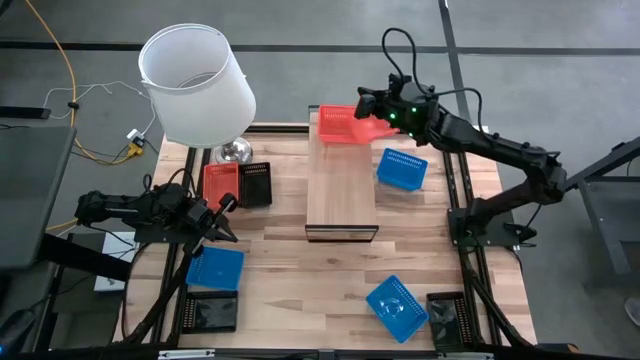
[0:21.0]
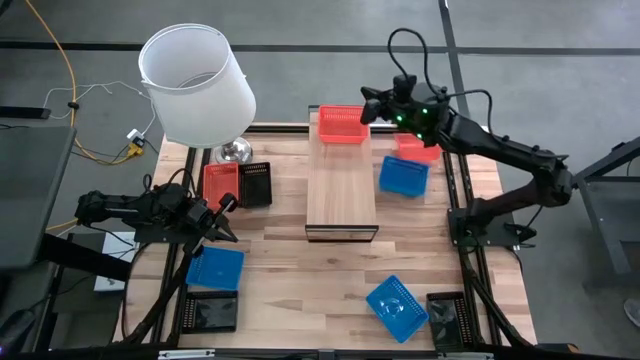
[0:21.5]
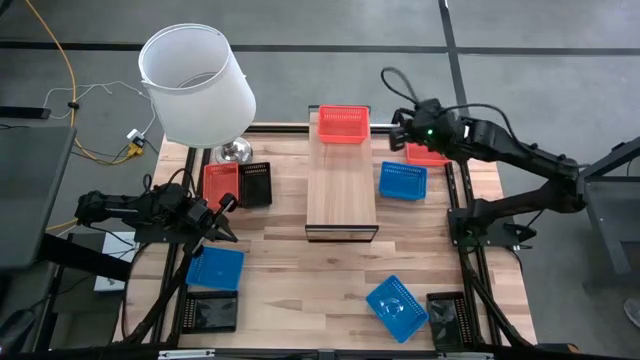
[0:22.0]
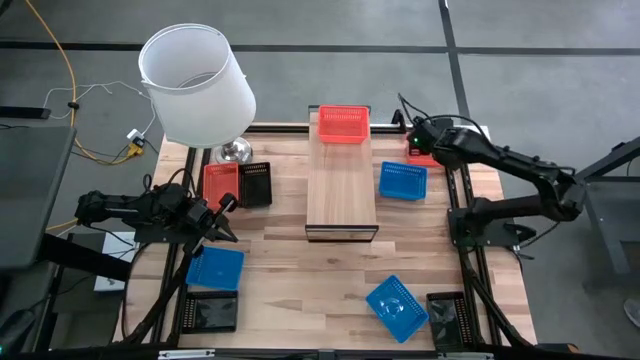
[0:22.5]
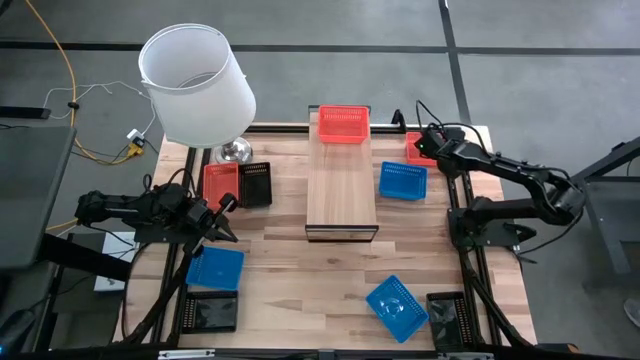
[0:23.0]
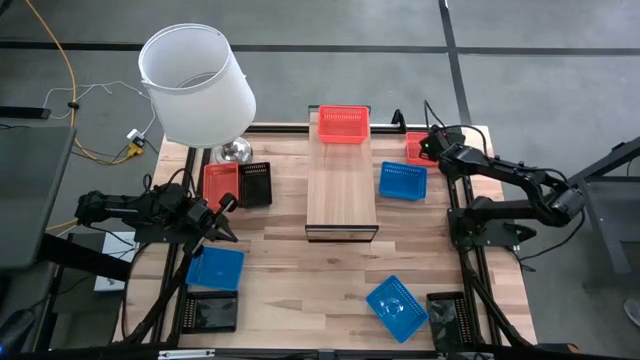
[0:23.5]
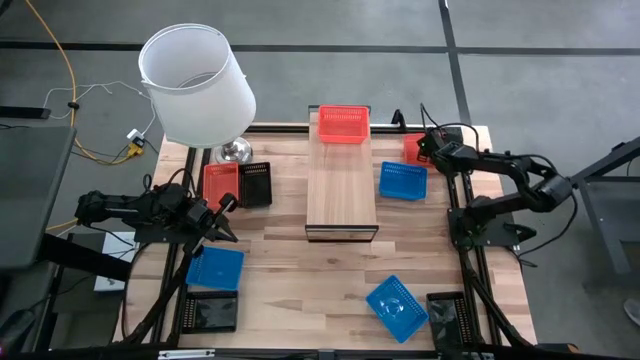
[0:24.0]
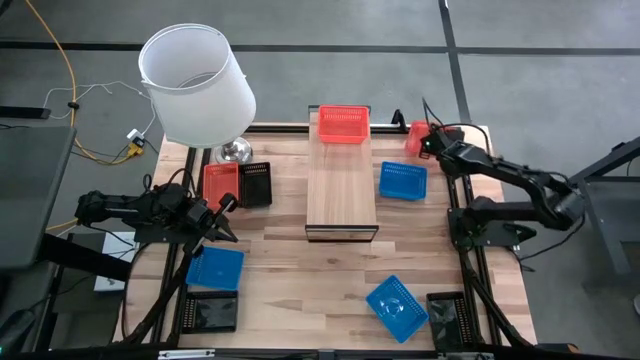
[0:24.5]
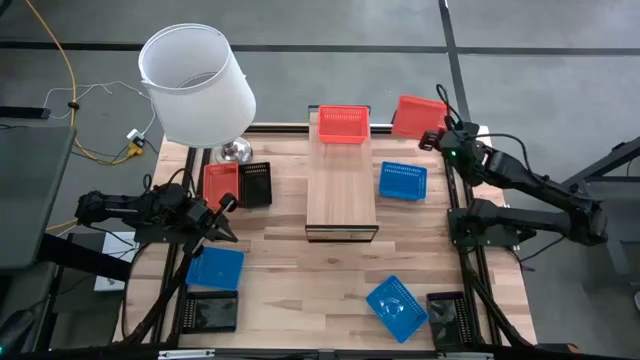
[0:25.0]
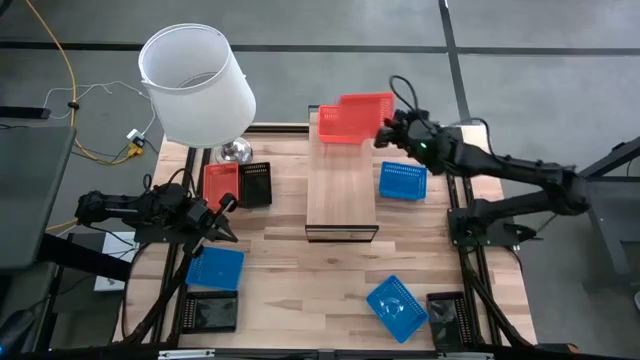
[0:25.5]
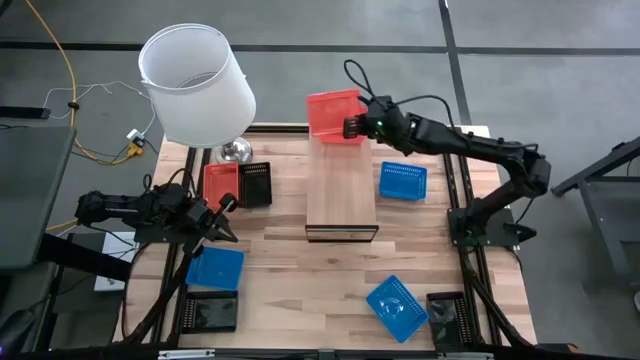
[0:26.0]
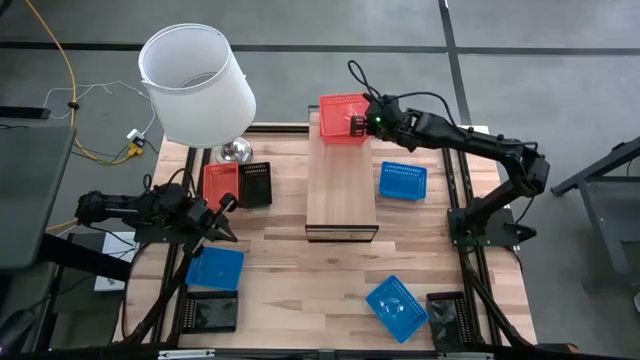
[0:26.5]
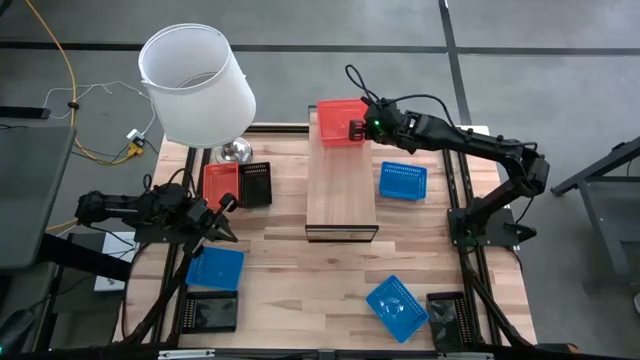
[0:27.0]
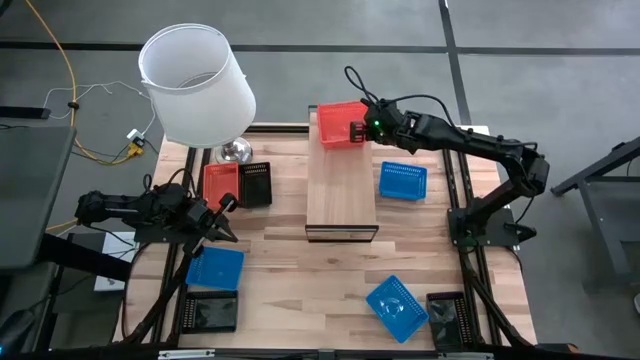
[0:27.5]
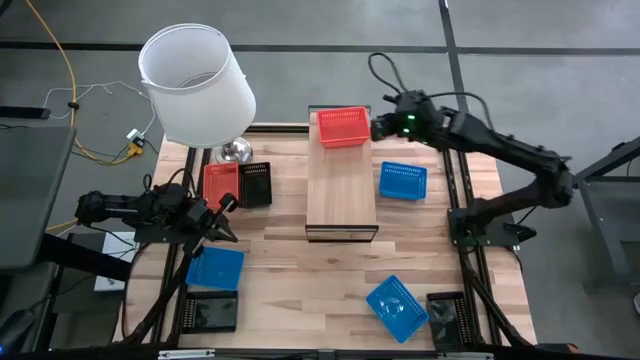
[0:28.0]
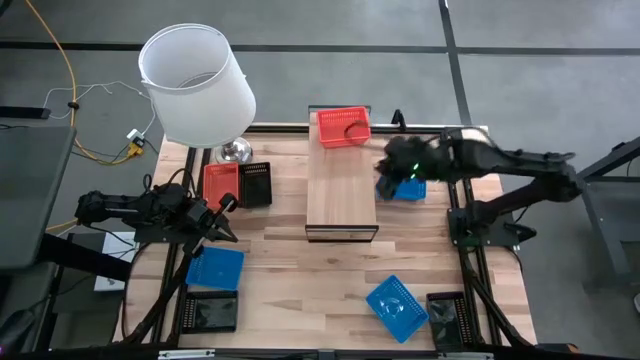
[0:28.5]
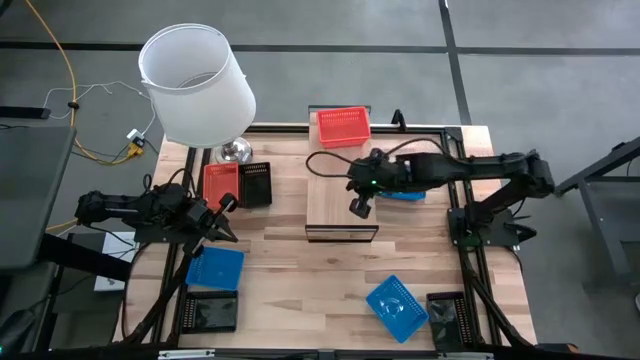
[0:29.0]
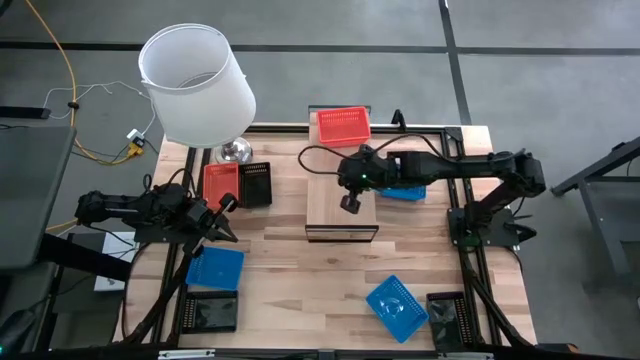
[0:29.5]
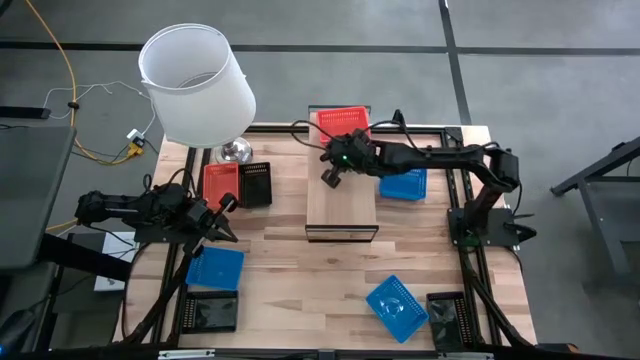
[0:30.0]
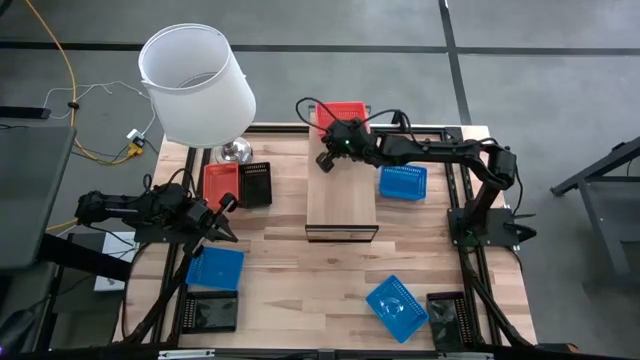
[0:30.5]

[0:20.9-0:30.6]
Task: Stack baskets on shelf by color
Stack the right orange bin on top of the orange bin on the shelf

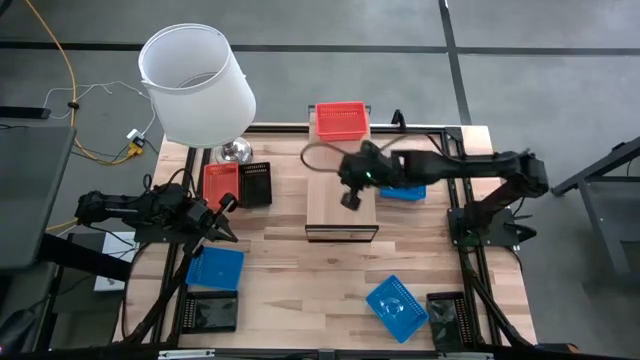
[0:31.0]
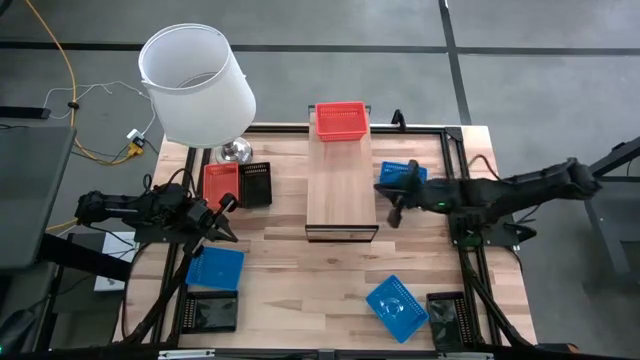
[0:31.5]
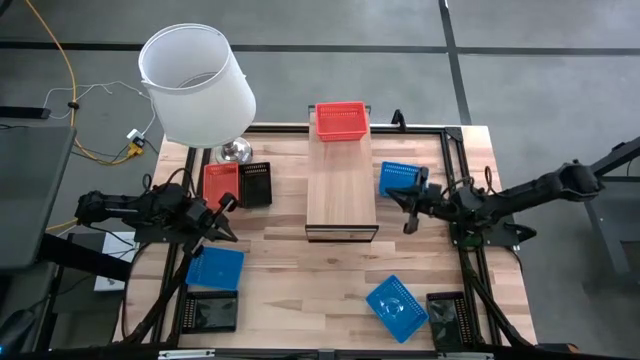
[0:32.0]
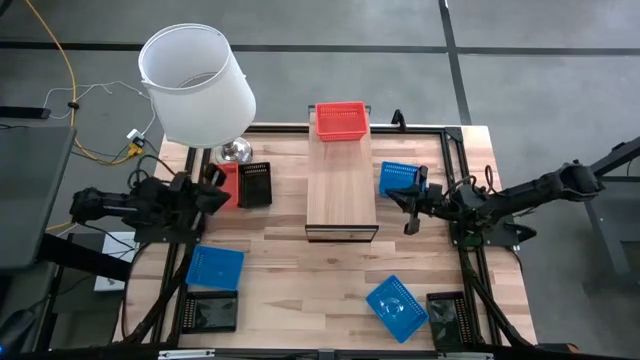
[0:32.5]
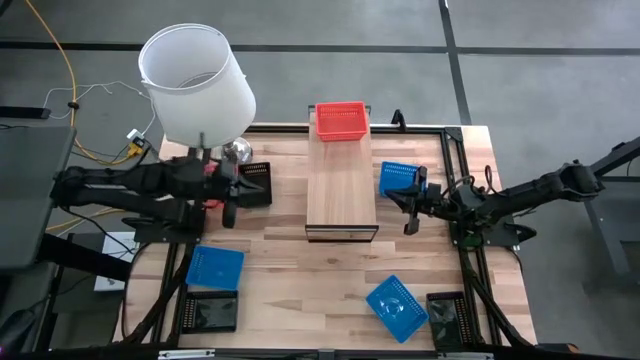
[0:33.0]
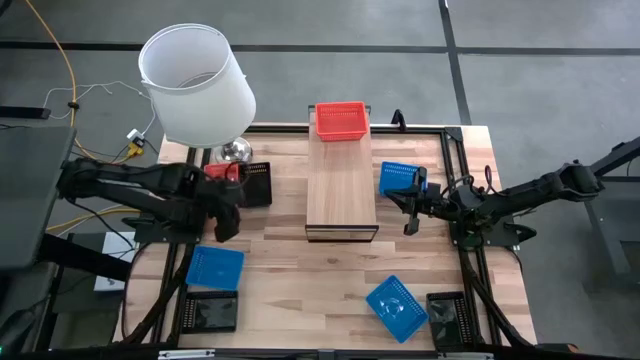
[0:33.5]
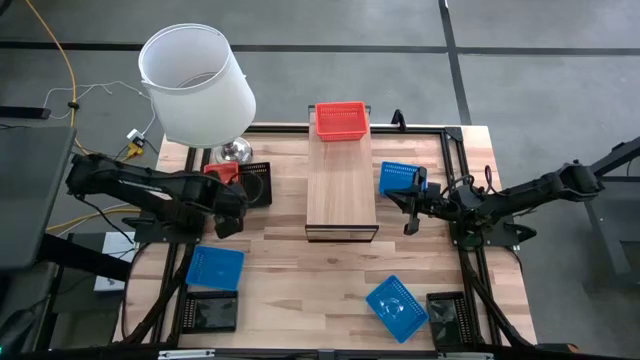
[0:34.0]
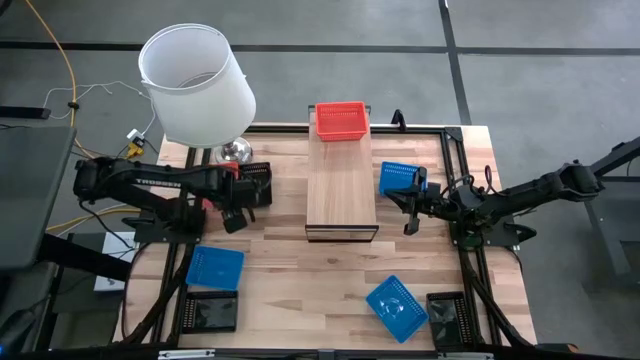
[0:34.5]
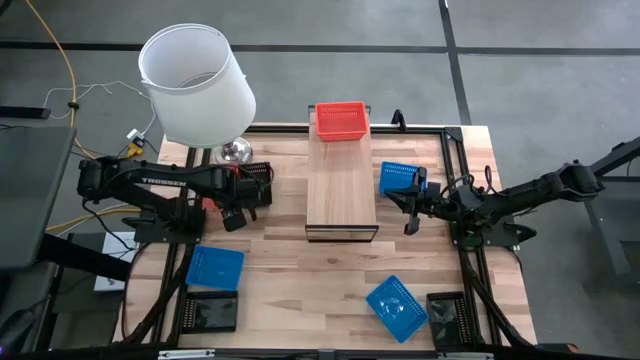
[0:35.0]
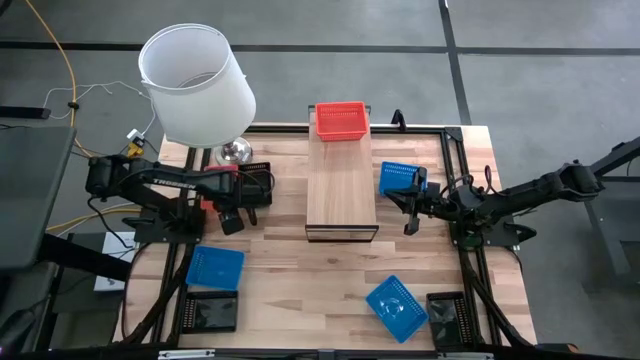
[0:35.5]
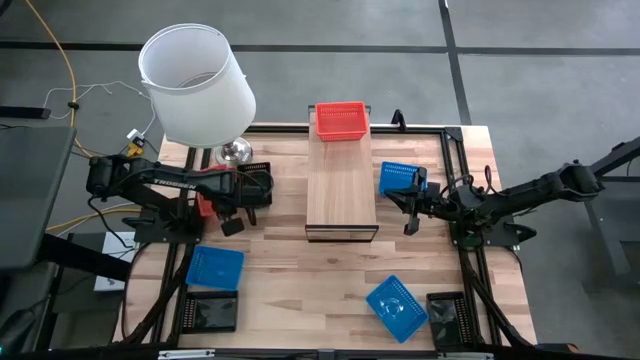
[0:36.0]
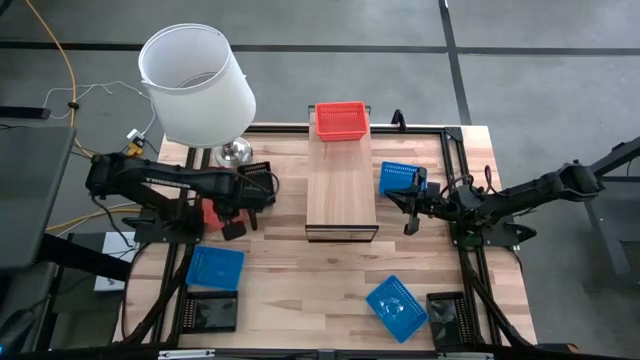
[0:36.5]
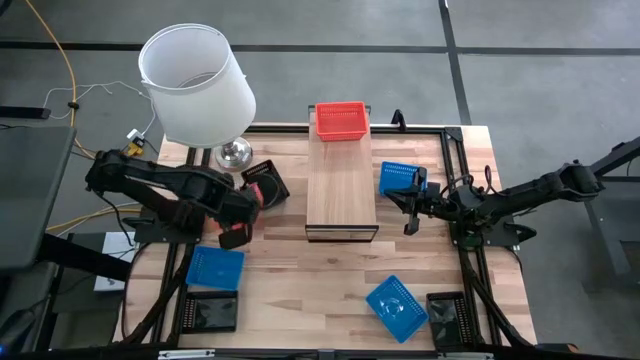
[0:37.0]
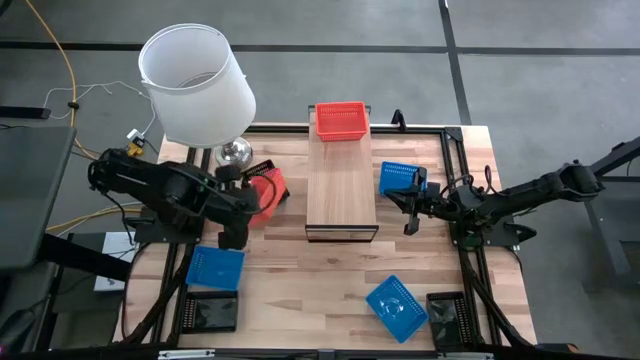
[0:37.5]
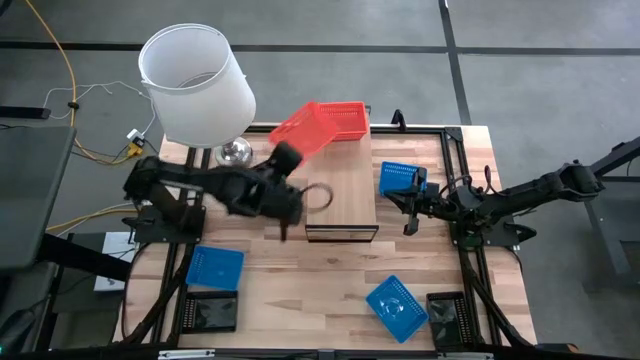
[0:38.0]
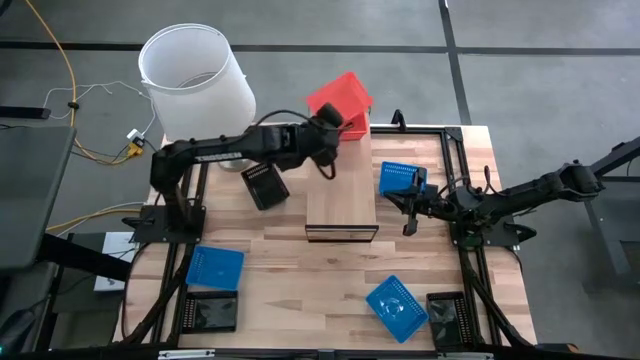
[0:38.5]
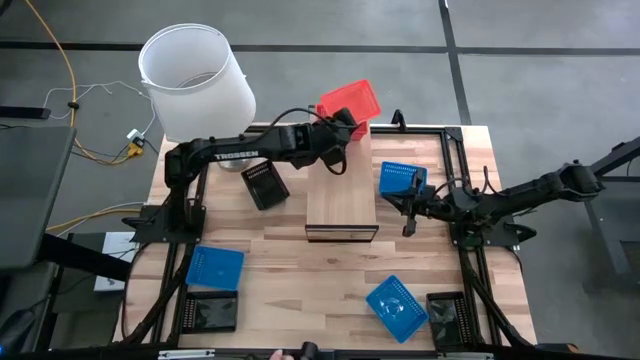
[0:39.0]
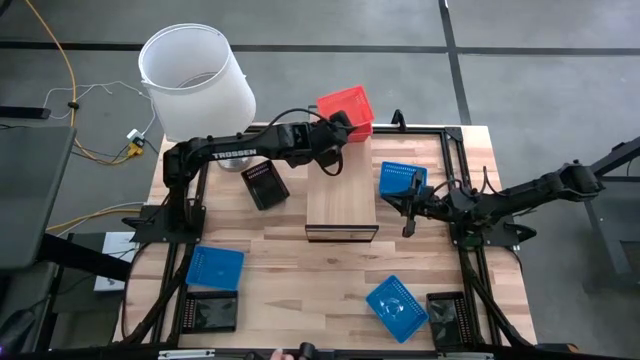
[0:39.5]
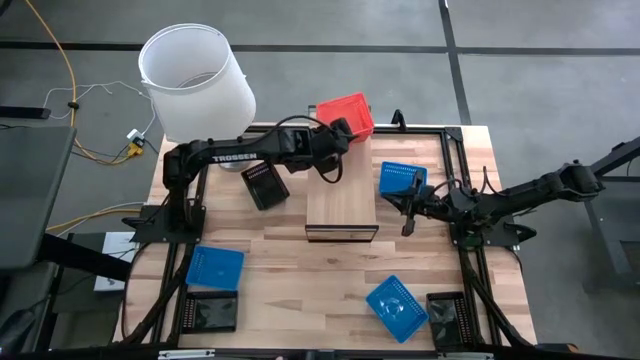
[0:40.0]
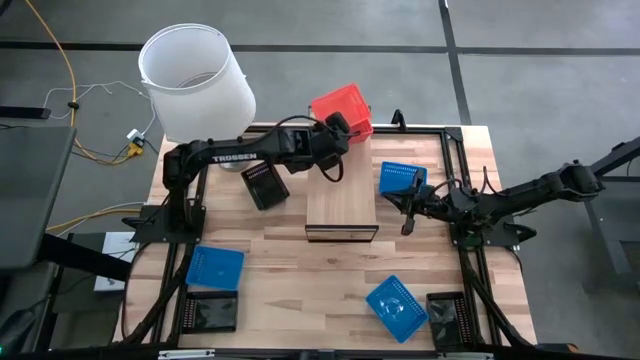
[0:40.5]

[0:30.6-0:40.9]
Stack the orange bin on top of the orange bin on the shelf
